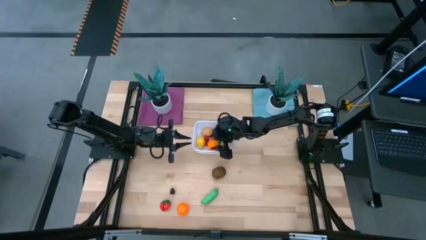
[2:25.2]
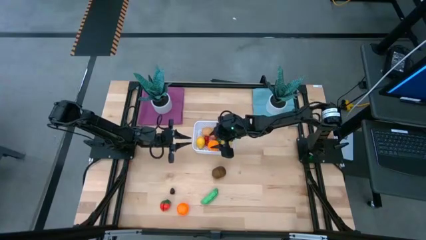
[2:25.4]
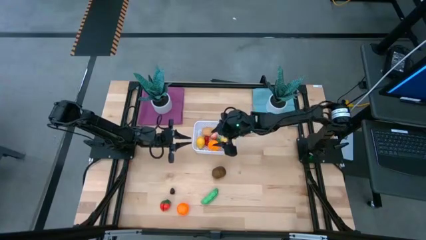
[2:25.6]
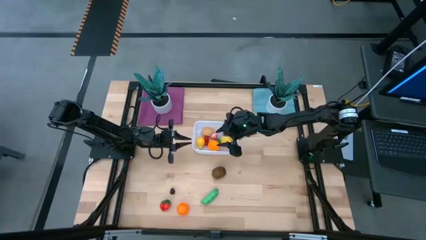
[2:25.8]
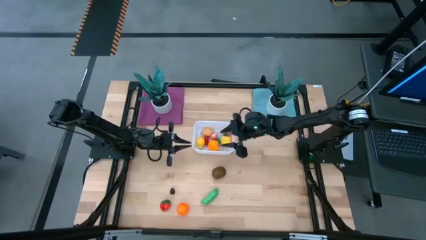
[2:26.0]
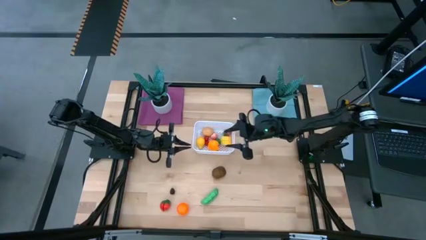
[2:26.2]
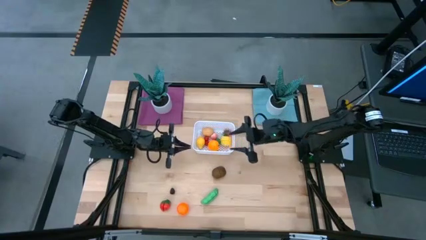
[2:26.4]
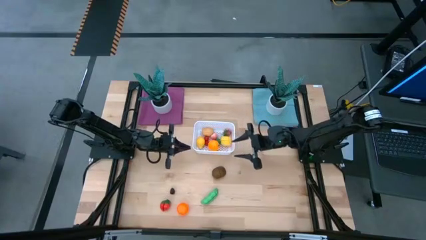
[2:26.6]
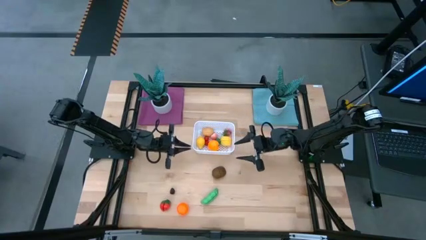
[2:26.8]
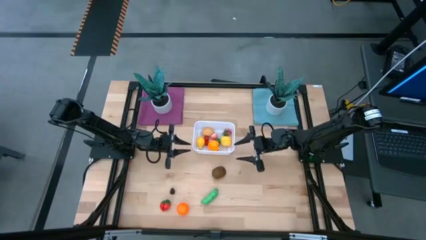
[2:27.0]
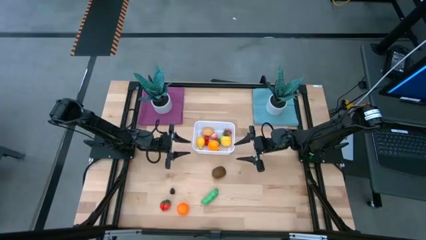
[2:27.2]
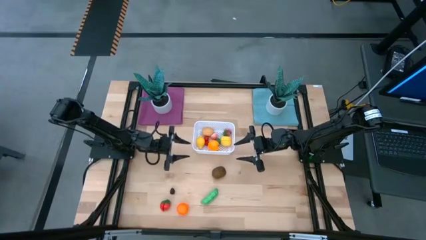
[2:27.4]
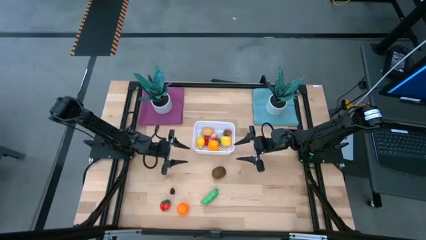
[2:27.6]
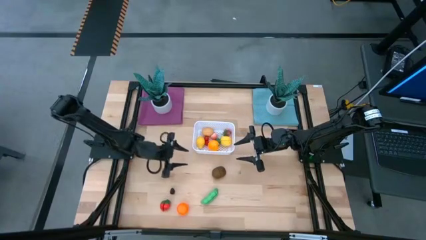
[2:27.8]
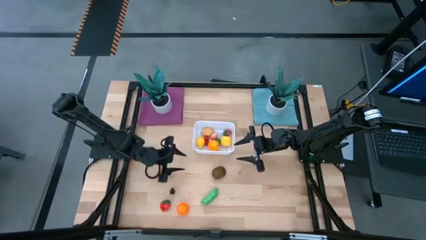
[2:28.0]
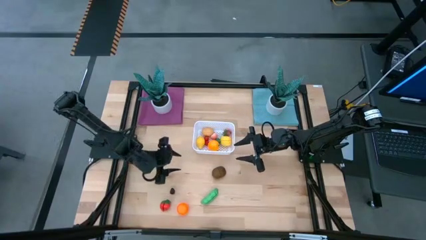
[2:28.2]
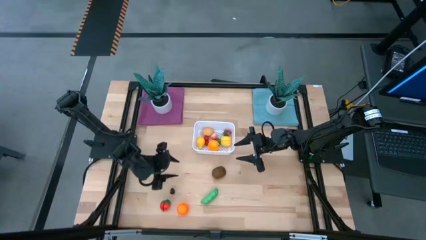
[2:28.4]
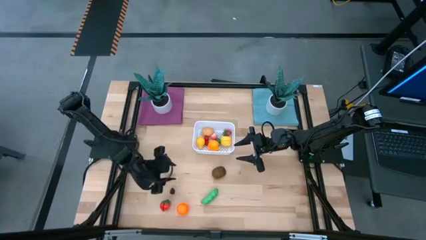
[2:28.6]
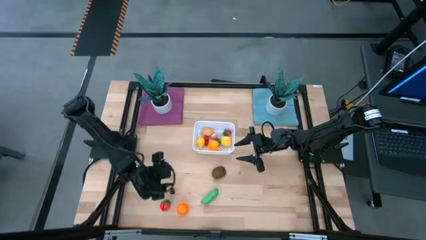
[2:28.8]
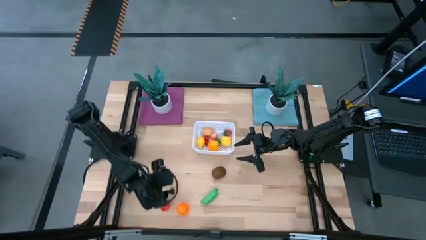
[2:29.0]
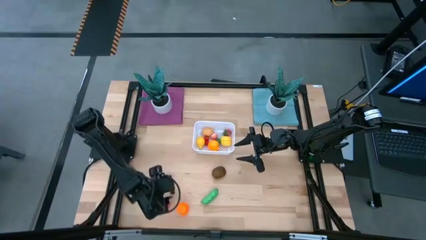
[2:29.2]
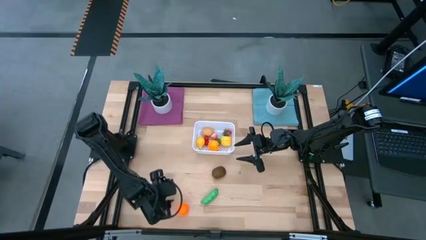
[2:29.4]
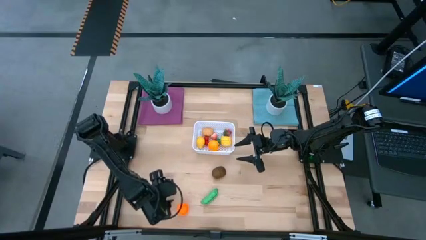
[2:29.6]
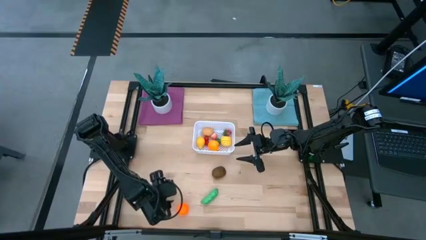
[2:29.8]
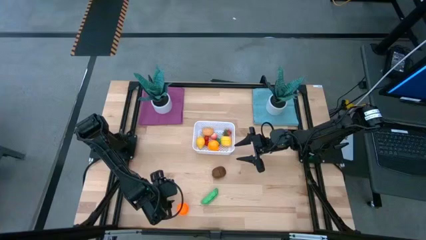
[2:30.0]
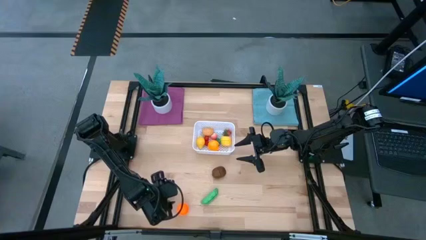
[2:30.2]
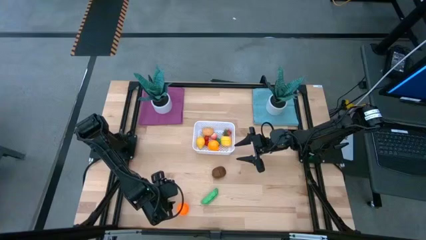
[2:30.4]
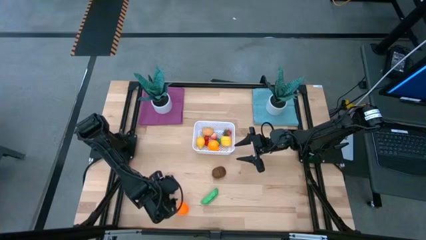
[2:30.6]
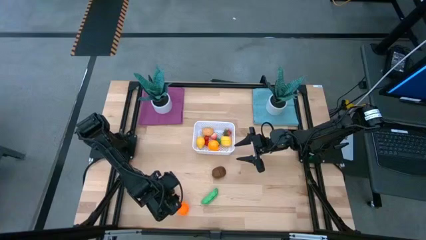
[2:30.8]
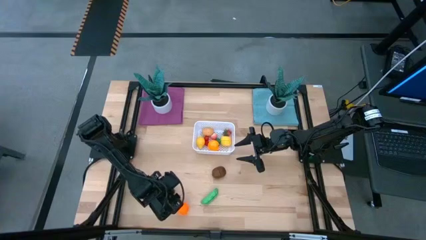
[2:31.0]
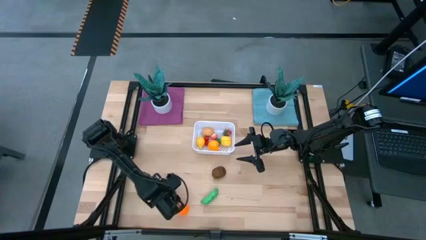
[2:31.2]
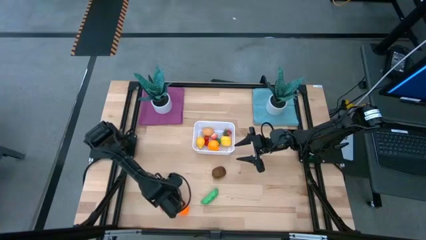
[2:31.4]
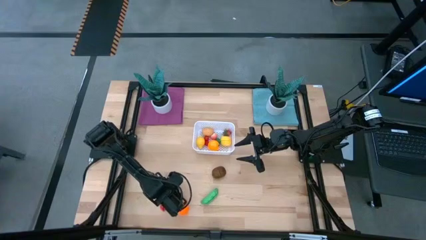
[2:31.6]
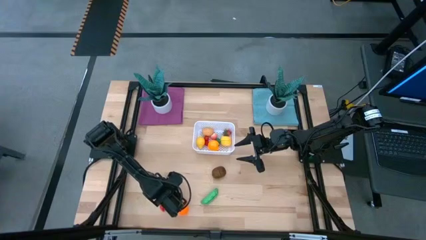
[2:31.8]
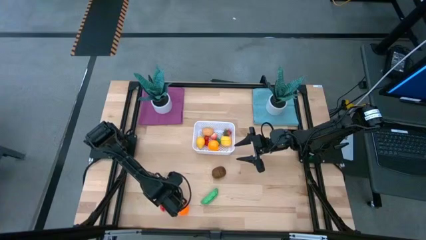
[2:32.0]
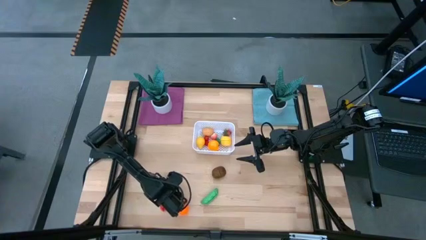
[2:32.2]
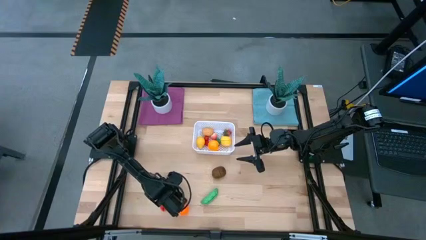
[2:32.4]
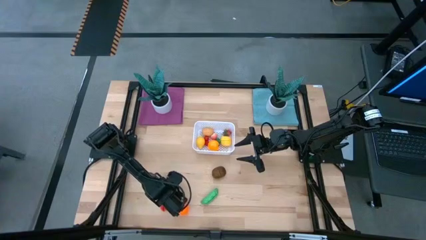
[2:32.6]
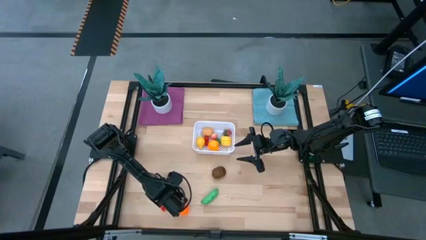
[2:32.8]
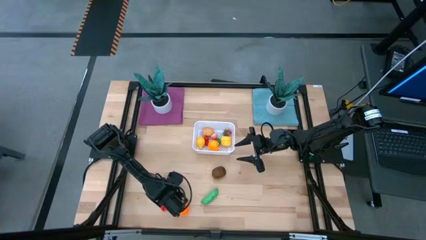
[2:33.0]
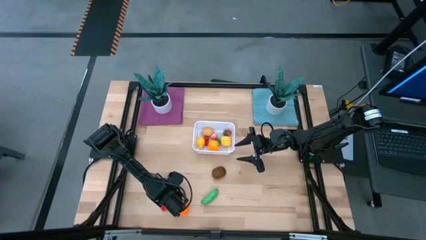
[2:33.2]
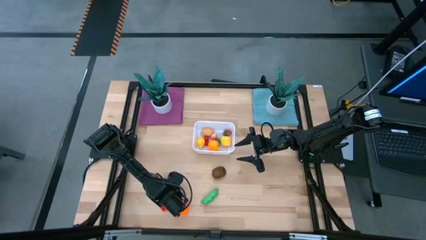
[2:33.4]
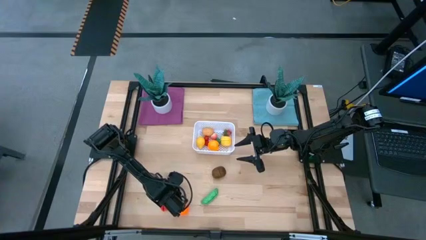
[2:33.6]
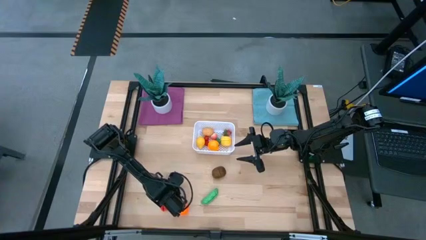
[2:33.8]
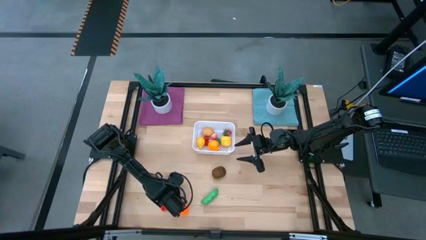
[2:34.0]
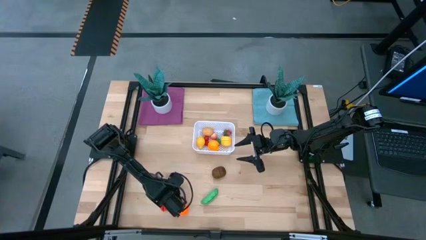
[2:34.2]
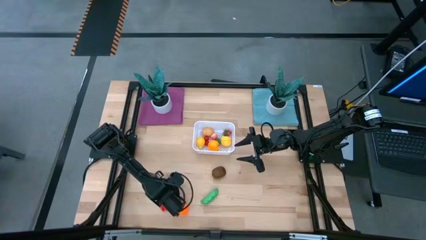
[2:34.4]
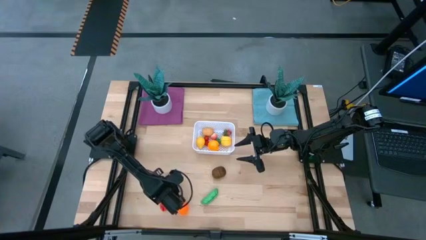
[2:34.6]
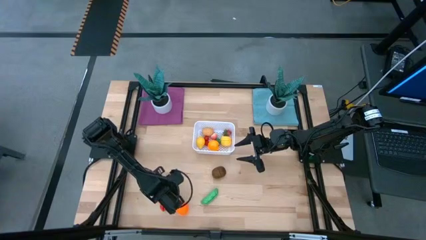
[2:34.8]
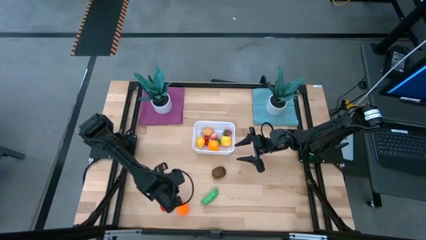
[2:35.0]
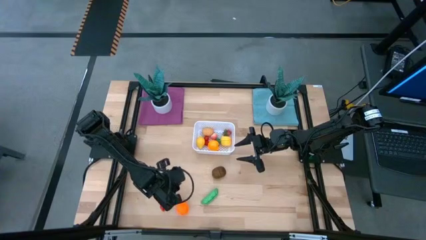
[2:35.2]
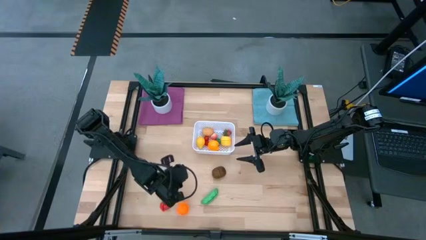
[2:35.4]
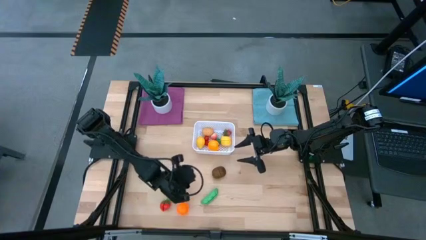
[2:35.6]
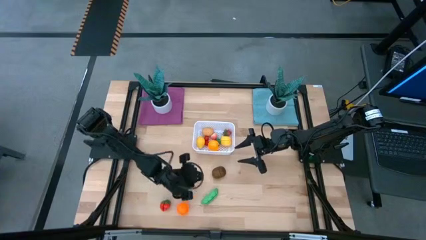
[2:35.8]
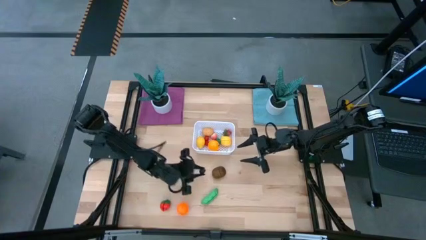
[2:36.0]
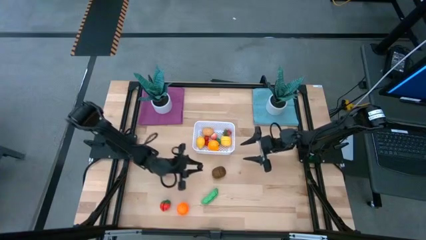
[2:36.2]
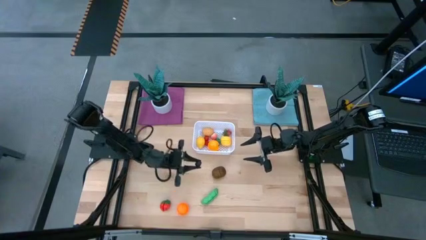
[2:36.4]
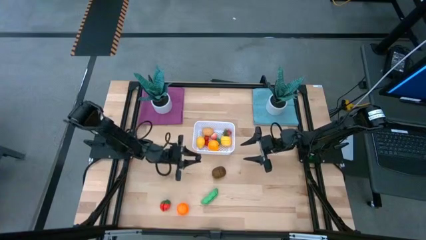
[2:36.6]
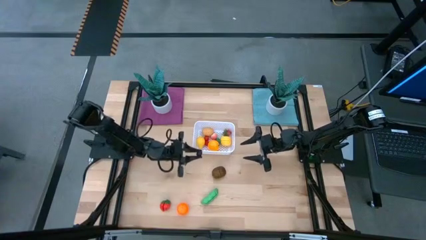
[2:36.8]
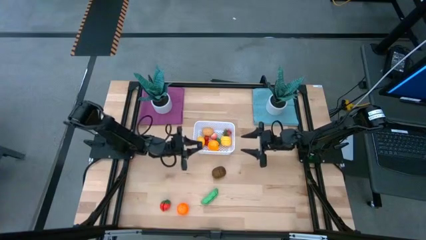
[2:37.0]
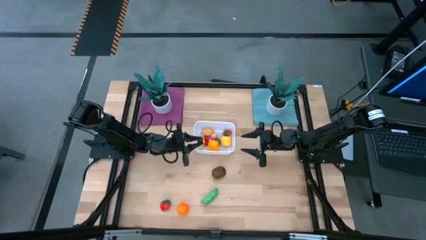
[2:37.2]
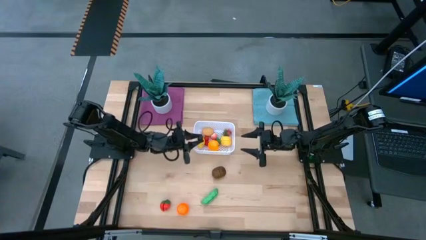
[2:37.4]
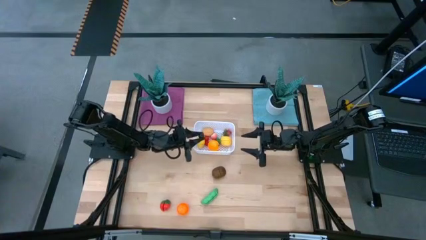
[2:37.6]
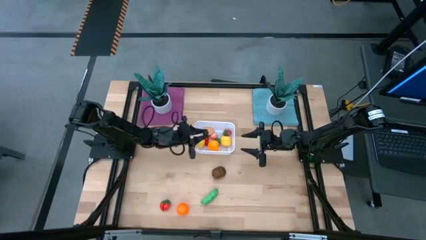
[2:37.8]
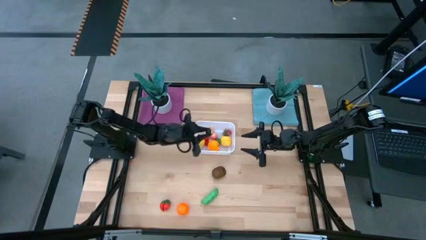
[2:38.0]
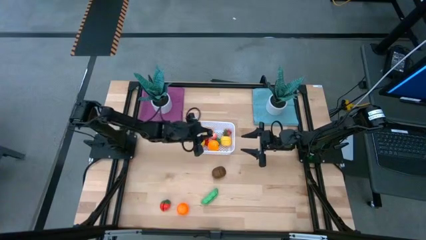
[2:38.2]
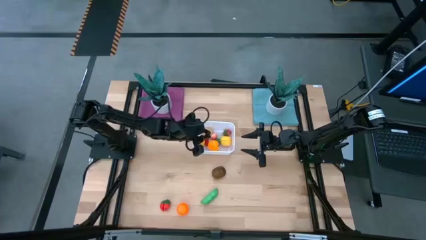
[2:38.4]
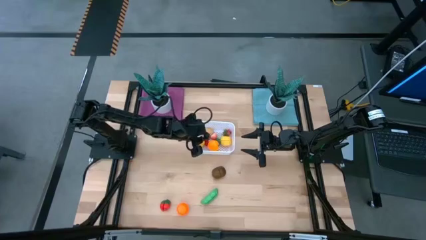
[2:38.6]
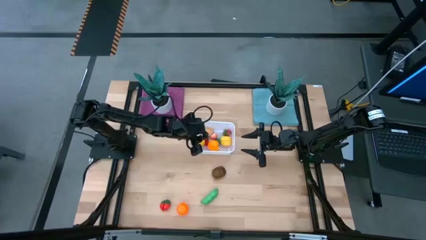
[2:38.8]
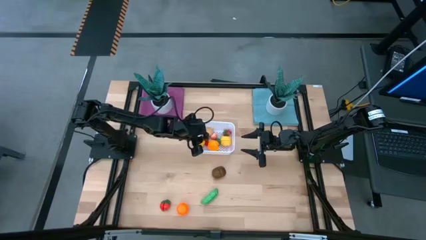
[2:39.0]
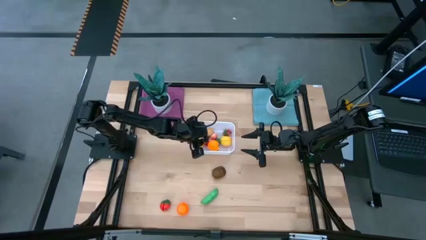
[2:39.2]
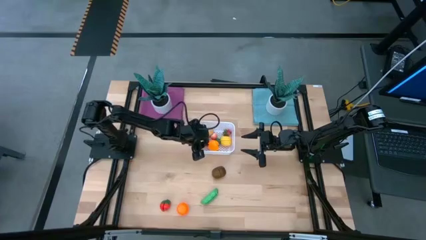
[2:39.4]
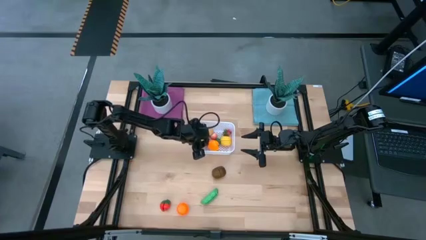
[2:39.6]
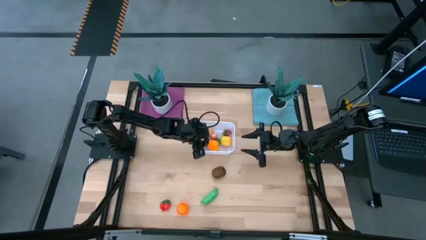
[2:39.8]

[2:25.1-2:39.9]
Task: Pick and placing Produce into tupperware
Put the blackberry into the white bin
